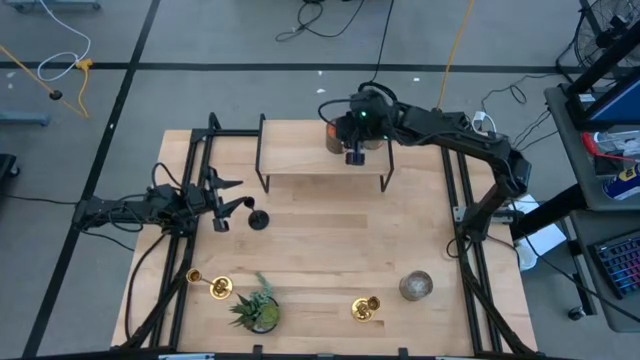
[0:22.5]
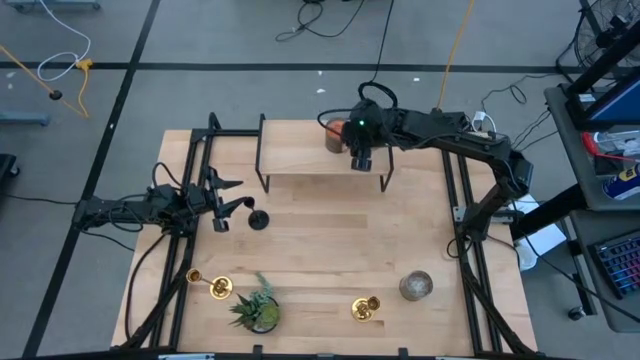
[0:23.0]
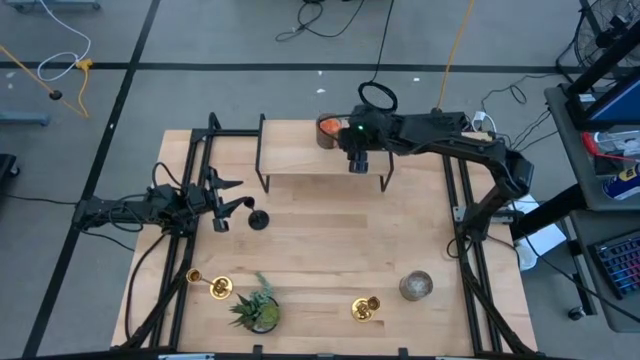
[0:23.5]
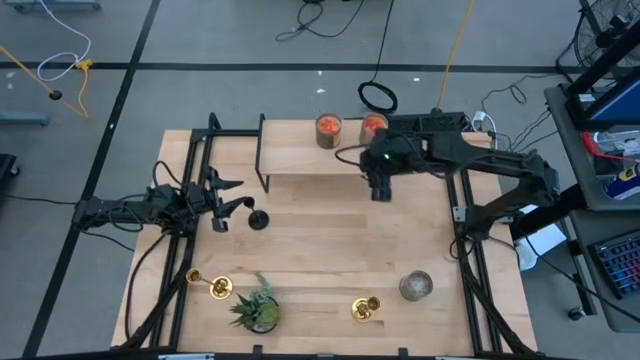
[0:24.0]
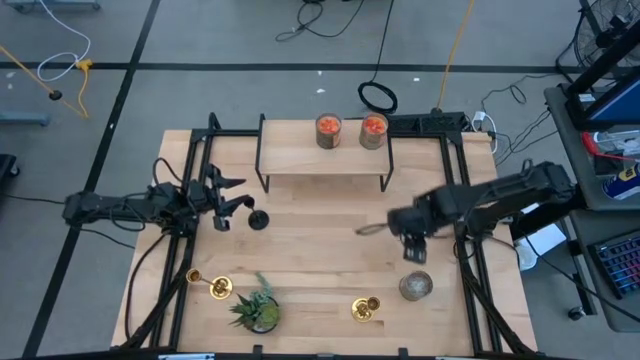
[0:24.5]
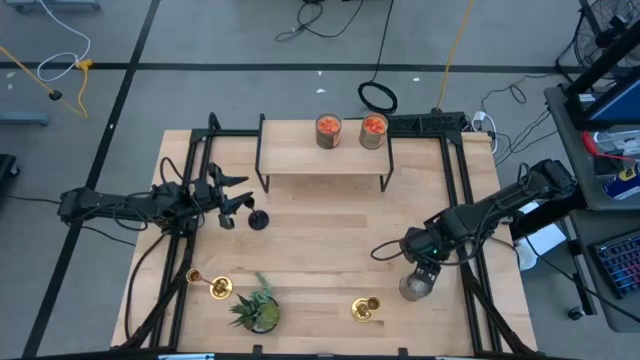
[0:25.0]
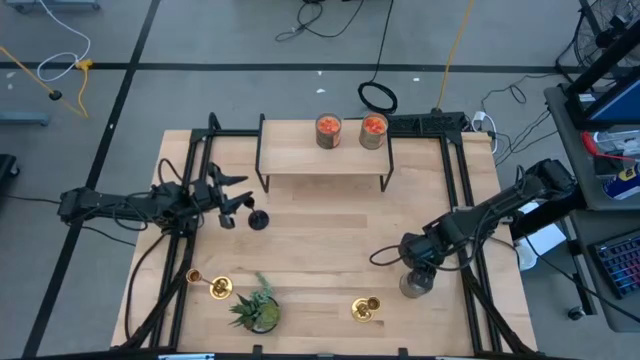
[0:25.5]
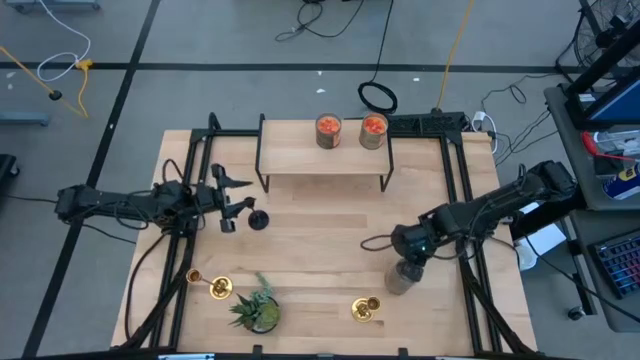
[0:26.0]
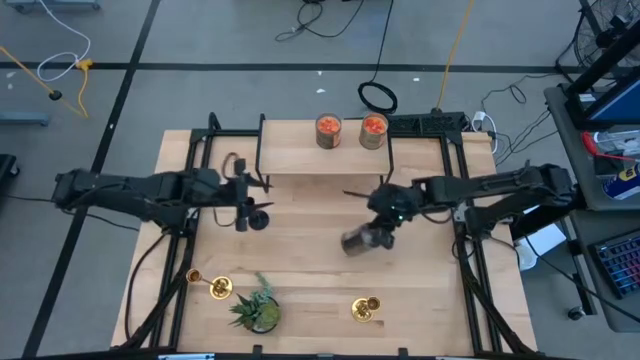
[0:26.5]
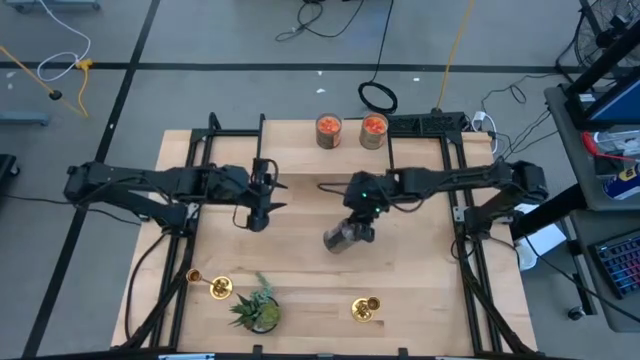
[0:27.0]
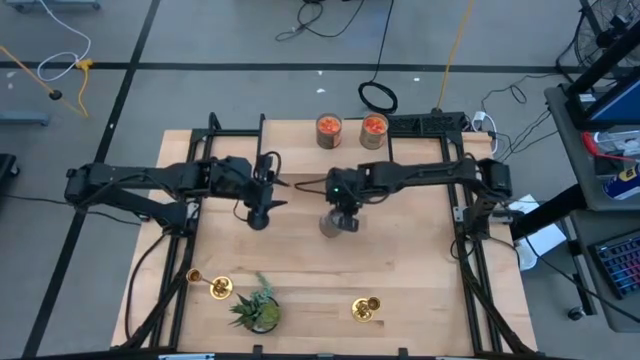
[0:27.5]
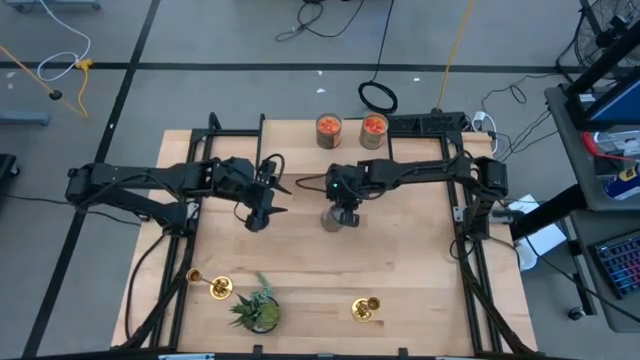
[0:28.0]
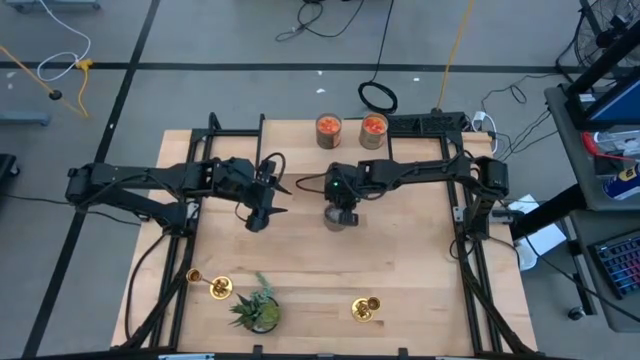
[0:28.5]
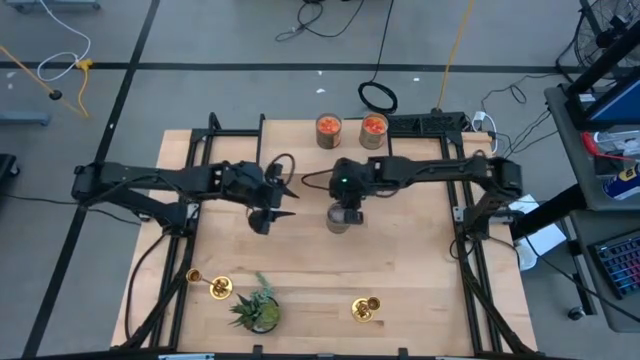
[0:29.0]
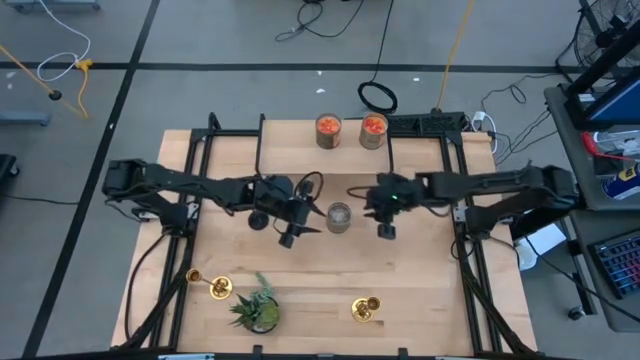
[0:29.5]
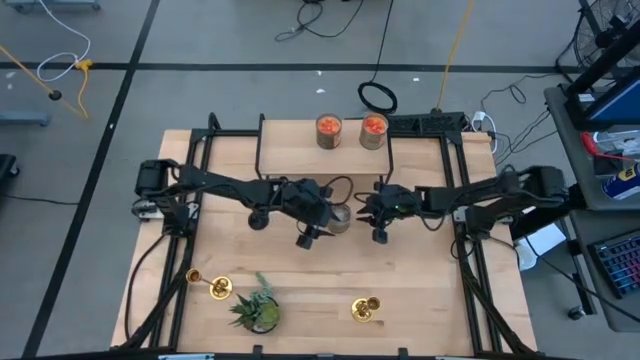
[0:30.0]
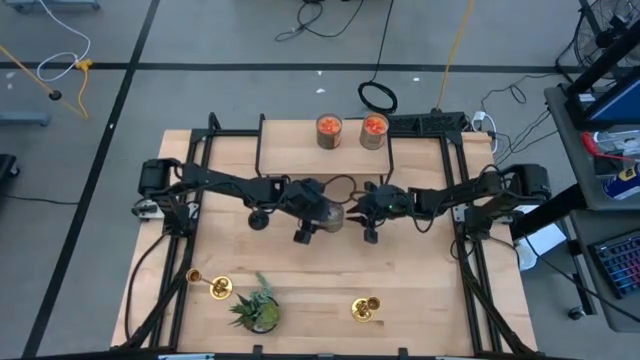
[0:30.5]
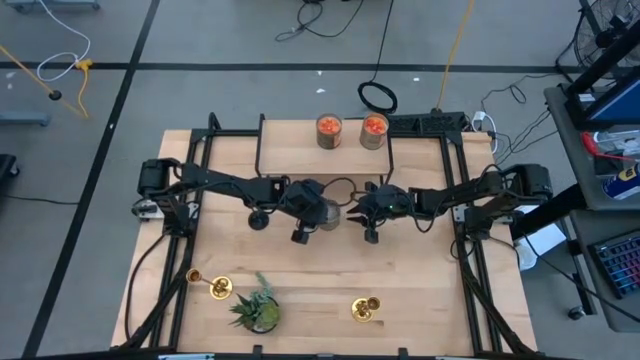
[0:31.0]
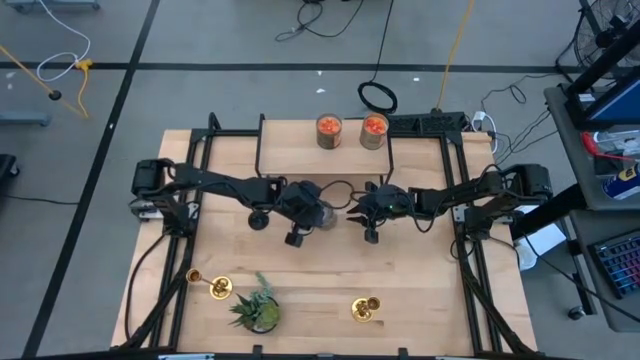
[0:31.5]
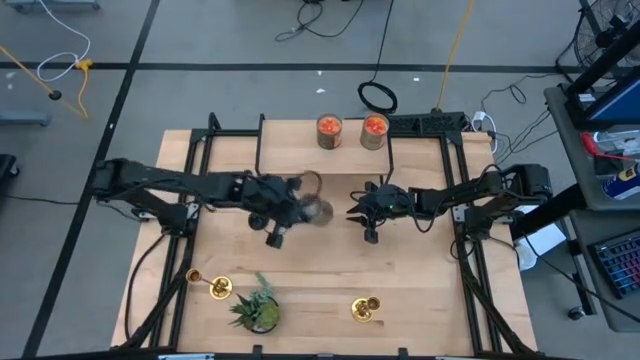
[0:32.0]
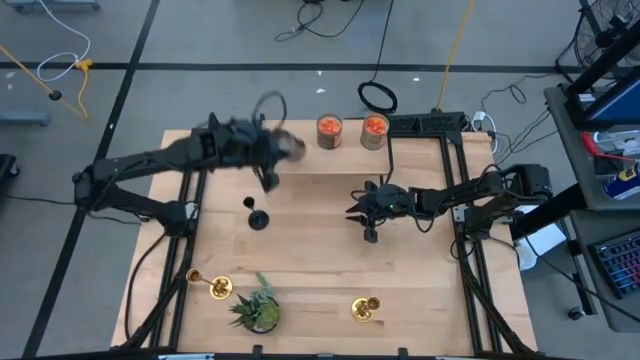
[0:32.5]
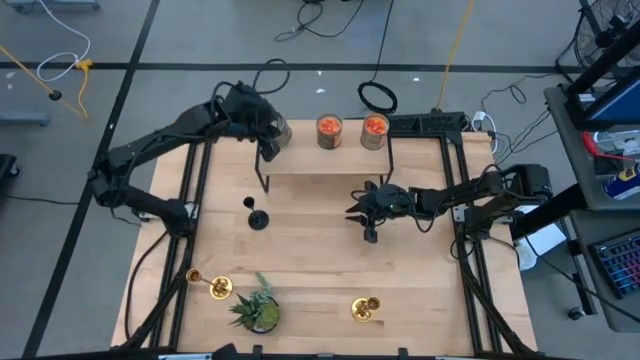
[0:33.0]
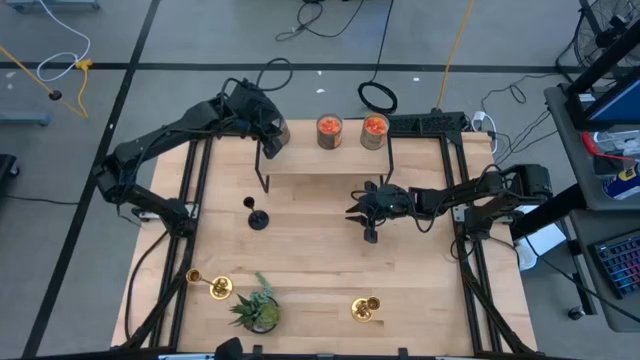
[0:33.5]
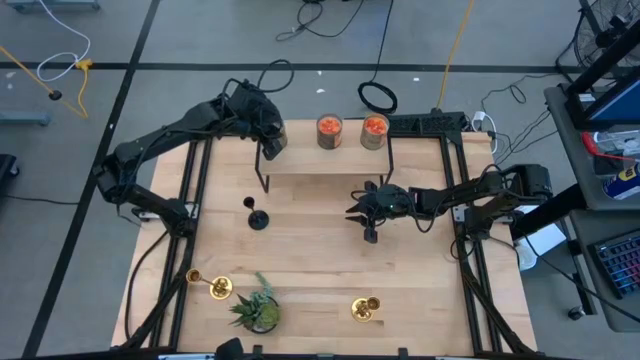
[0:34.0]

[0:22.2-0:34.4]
Task: Pick & Place candle stick holders
Put the brown scented candle on the shelf

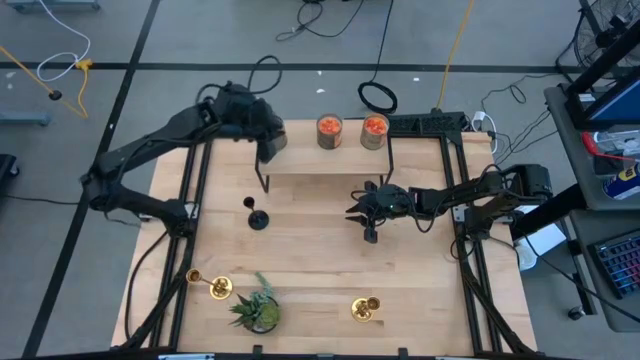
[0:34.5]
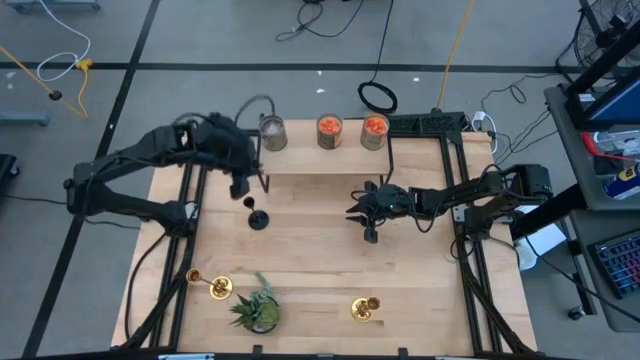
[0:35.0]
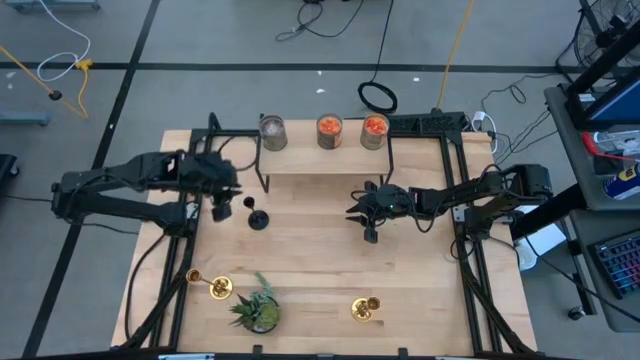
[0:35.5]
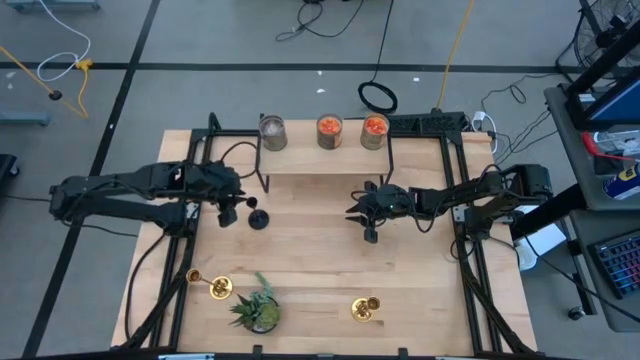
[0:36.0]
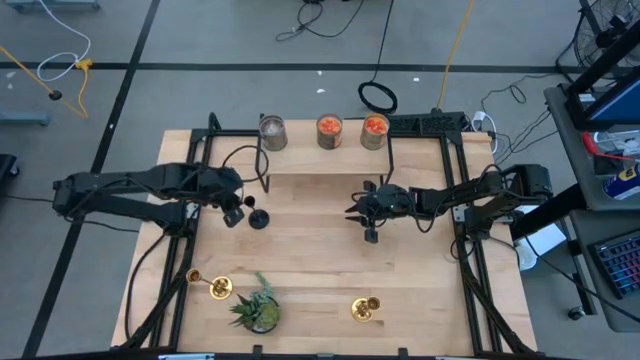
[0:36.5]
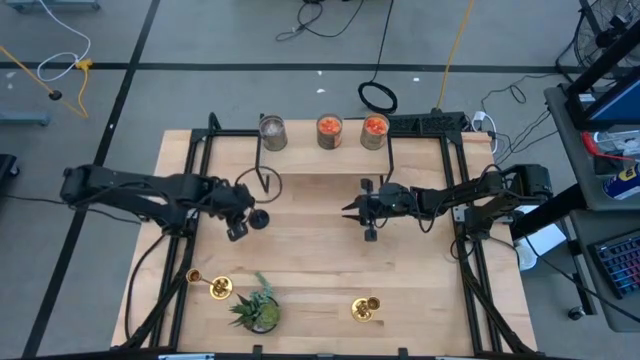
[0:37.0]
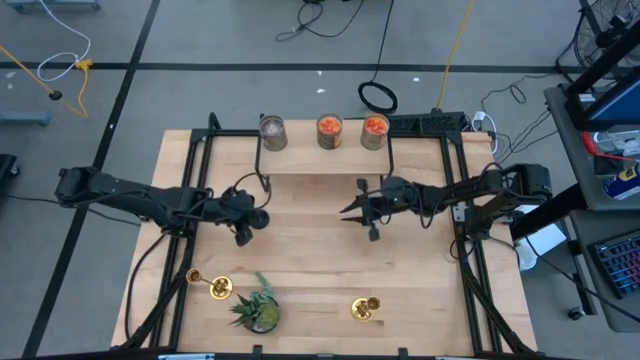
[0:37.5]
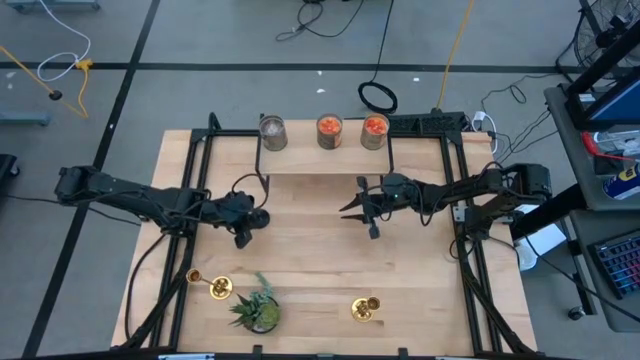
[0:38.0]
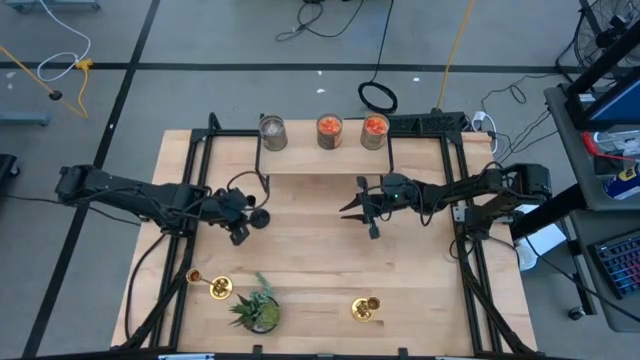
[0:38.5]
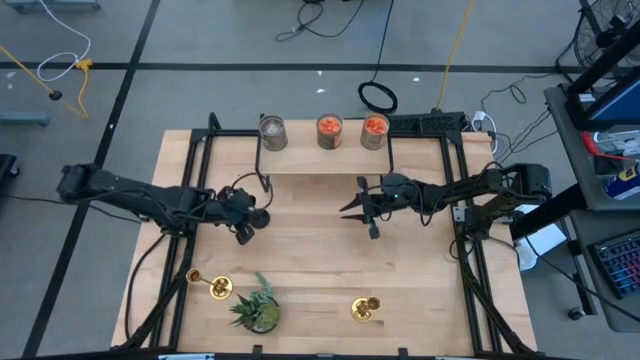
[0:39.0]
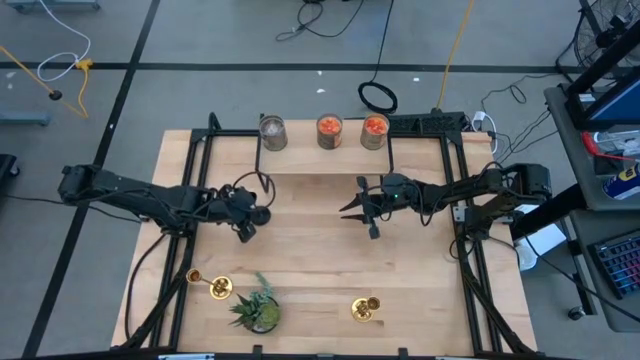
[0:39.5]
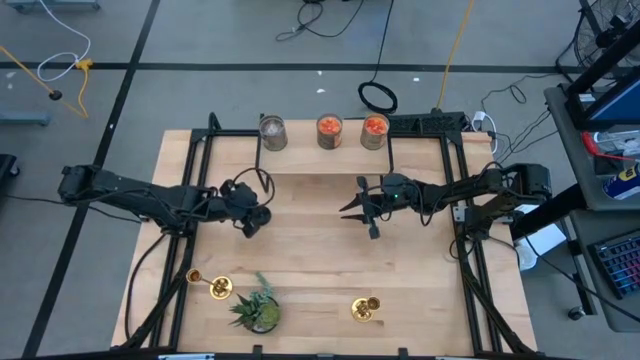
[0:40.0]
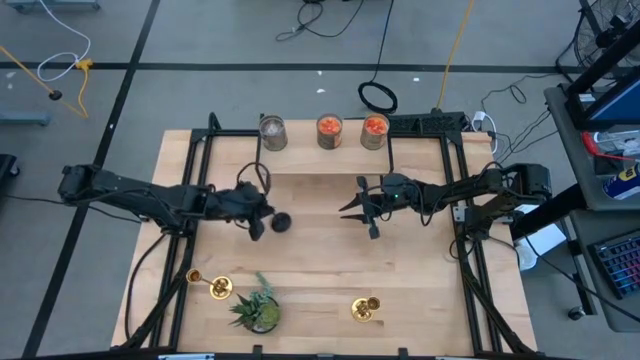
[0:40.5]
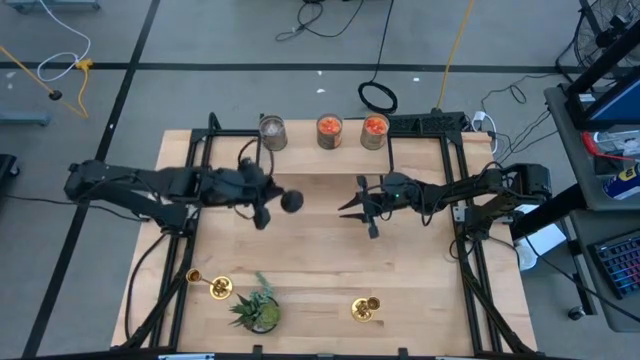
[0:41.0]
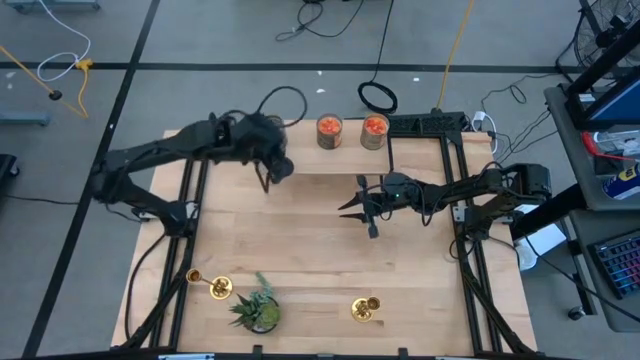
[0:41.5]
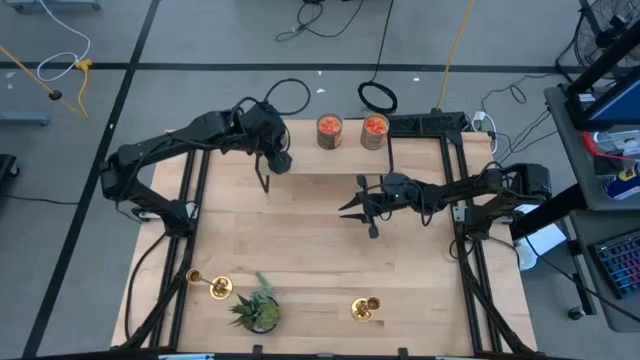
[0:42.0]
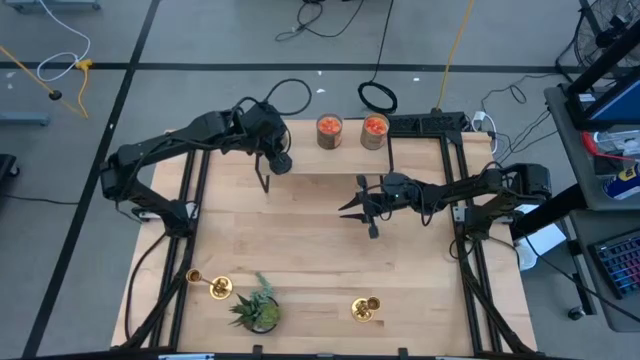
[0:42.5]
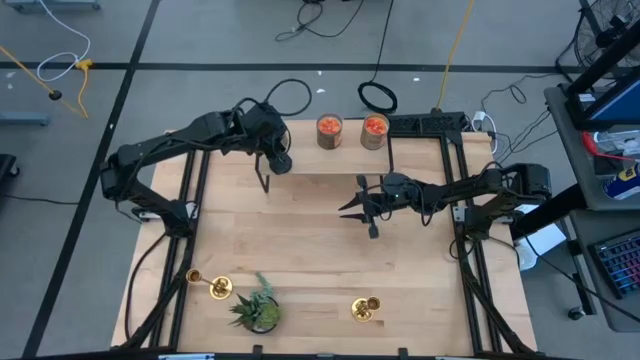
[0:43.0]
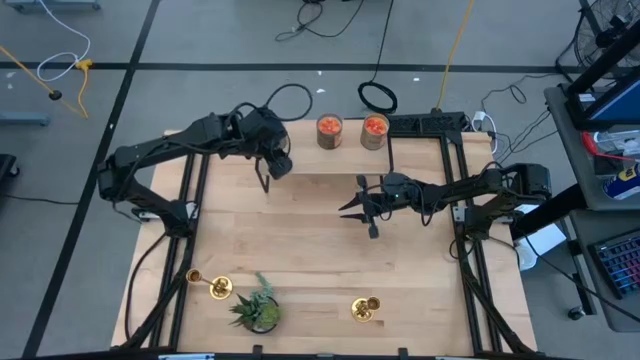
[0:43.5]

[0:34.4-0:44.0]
Put the black candle holder aligned with the brown scented candle on the shelf
